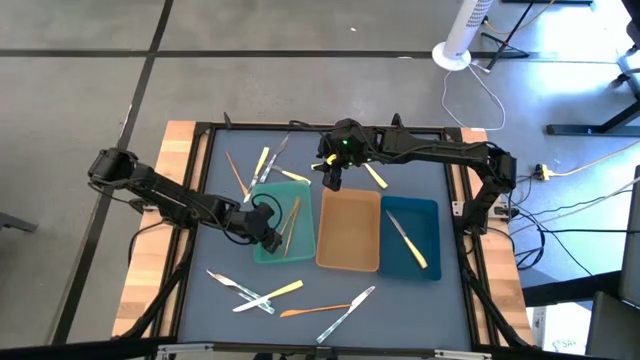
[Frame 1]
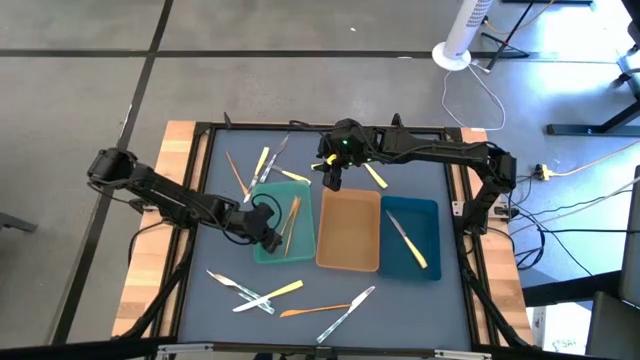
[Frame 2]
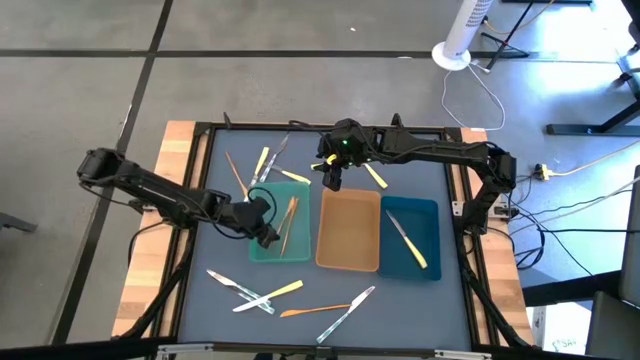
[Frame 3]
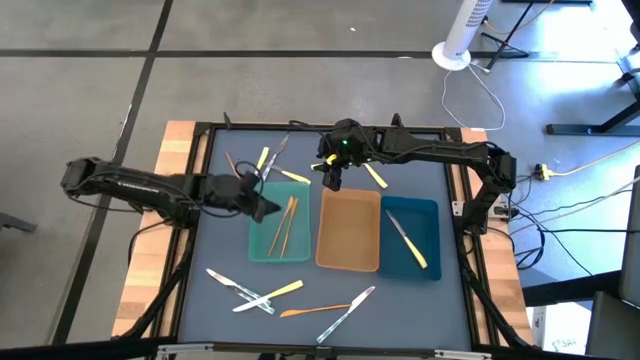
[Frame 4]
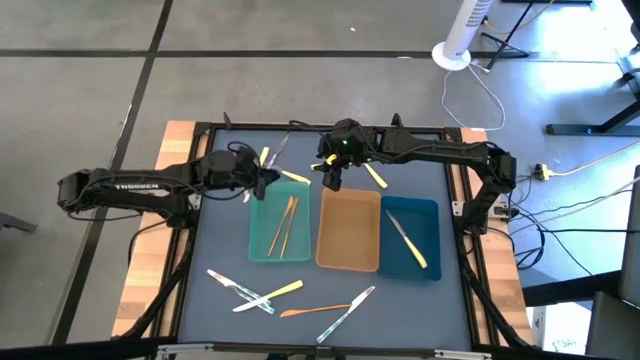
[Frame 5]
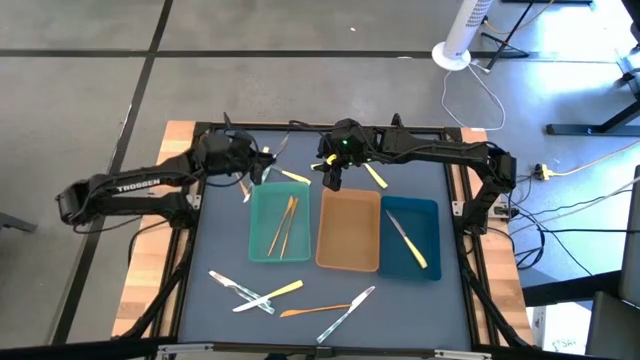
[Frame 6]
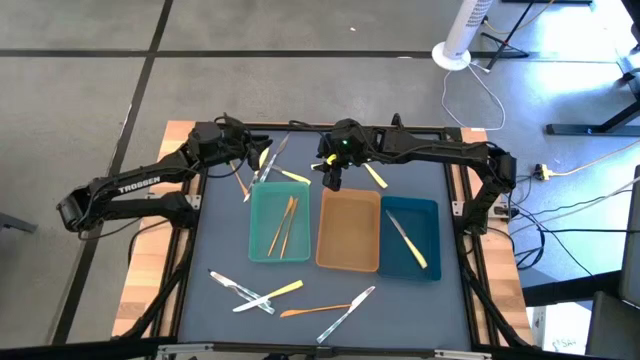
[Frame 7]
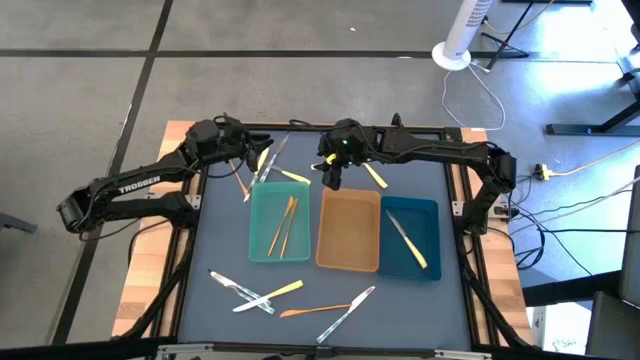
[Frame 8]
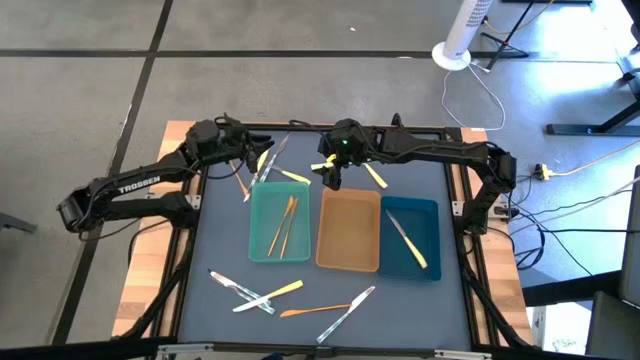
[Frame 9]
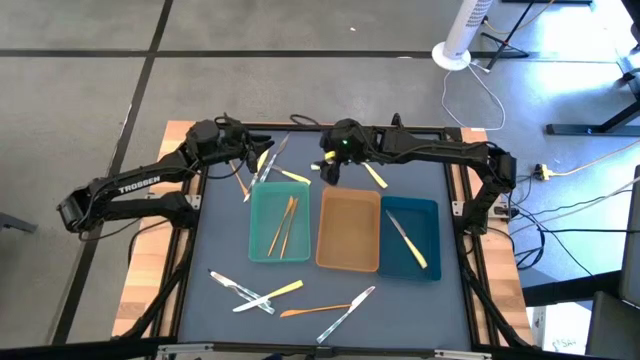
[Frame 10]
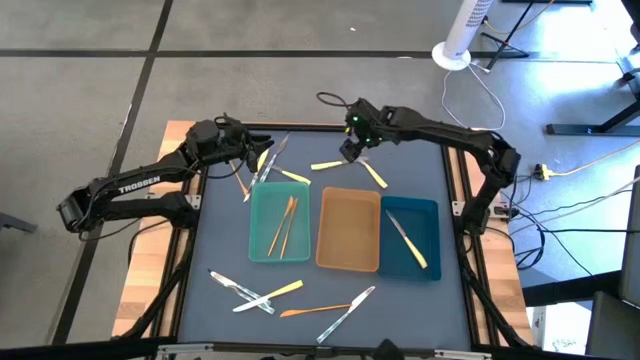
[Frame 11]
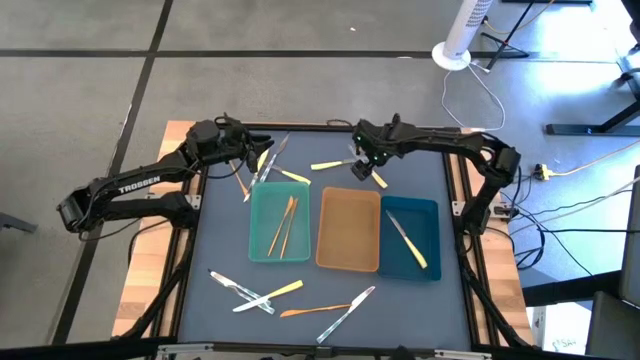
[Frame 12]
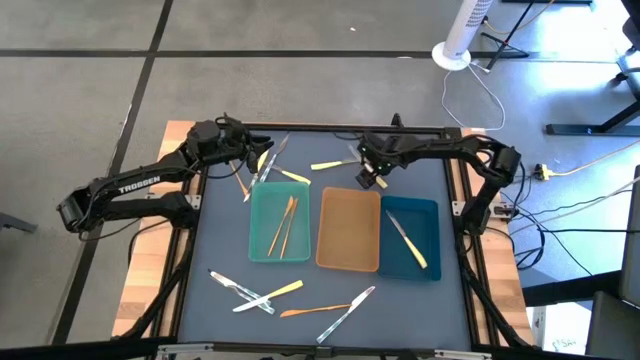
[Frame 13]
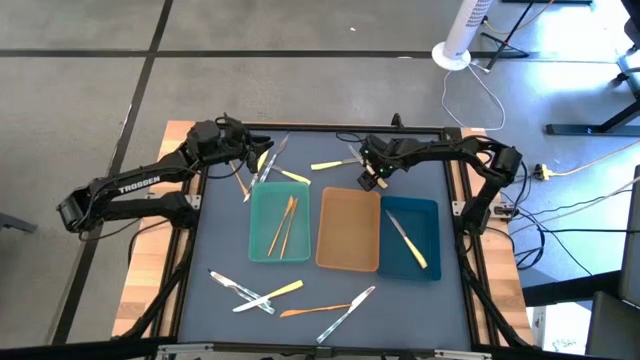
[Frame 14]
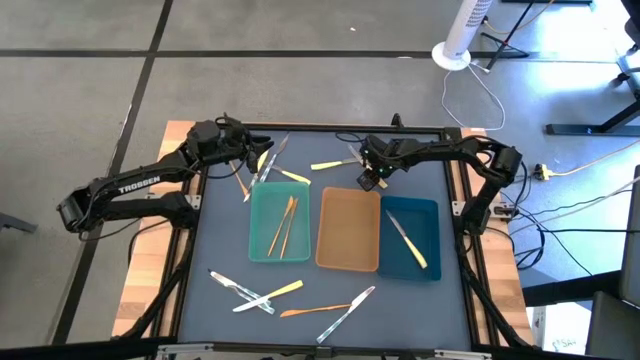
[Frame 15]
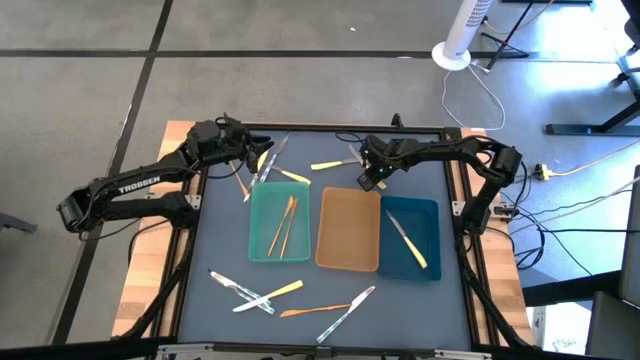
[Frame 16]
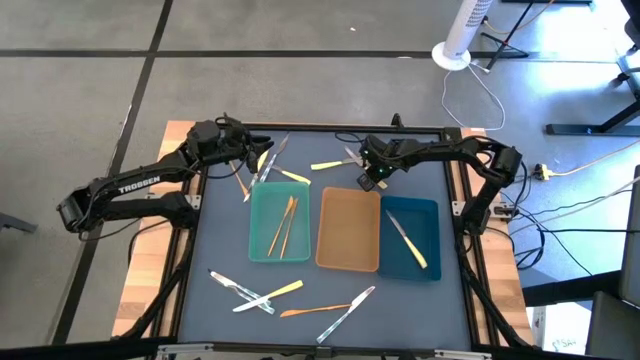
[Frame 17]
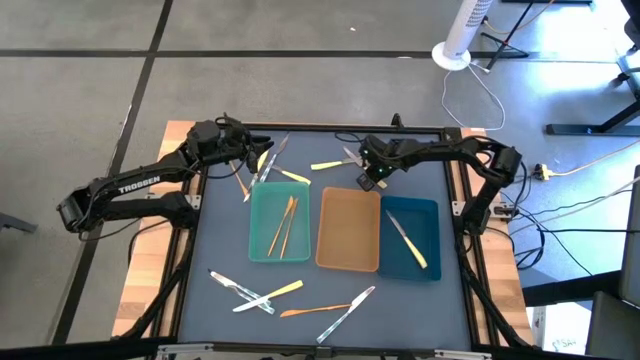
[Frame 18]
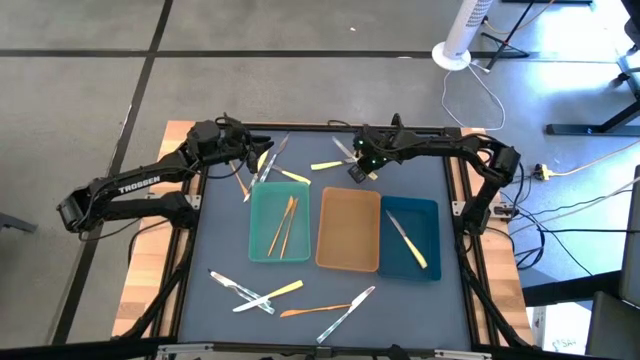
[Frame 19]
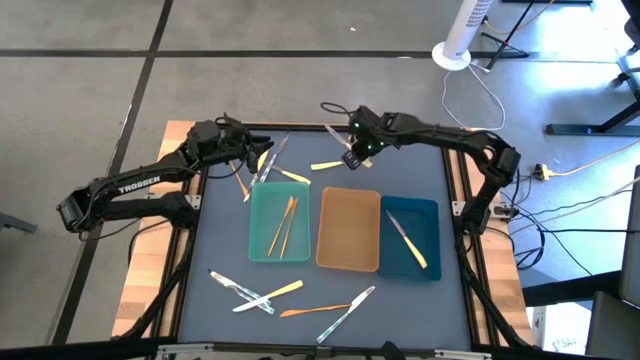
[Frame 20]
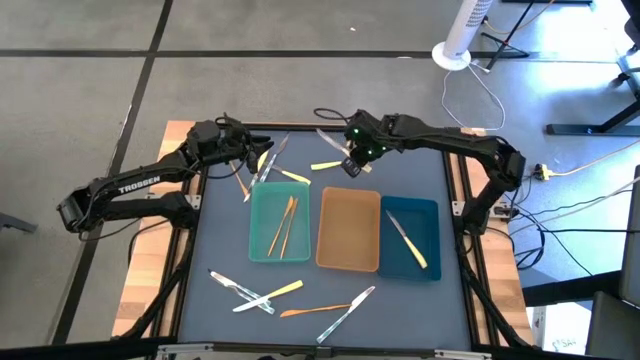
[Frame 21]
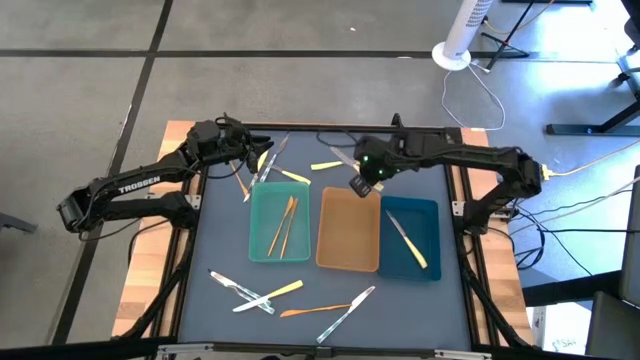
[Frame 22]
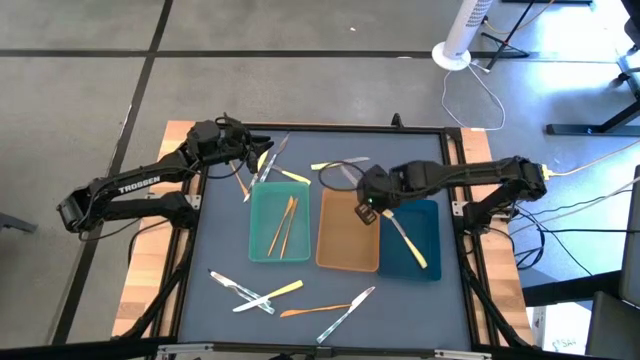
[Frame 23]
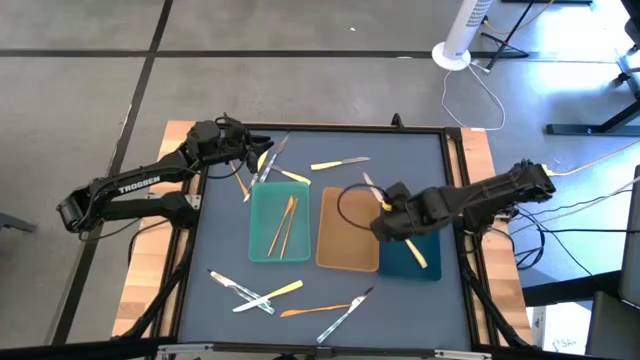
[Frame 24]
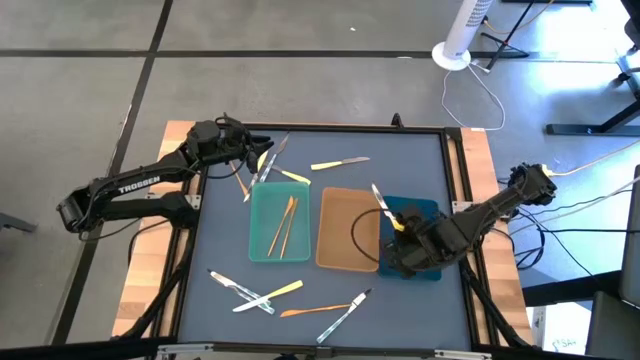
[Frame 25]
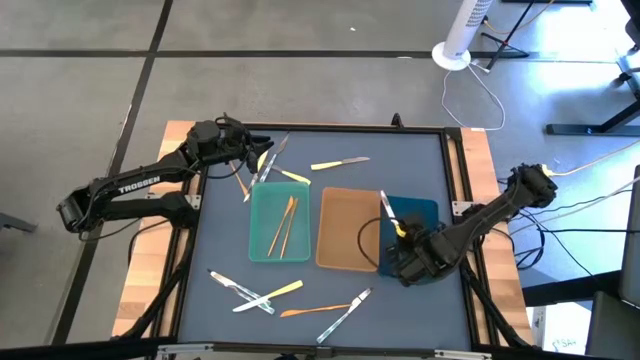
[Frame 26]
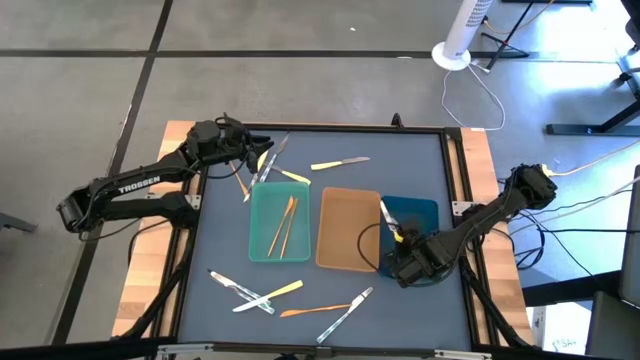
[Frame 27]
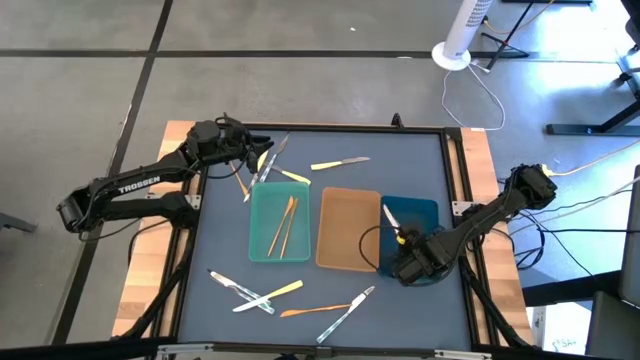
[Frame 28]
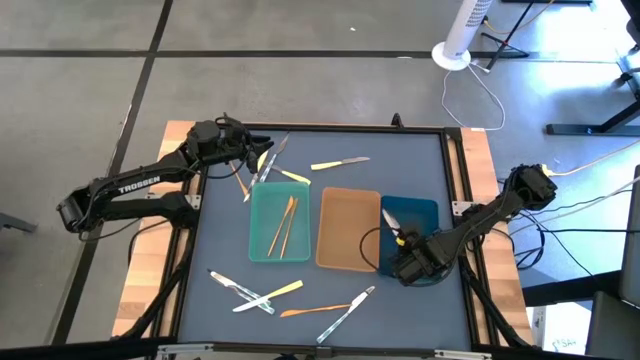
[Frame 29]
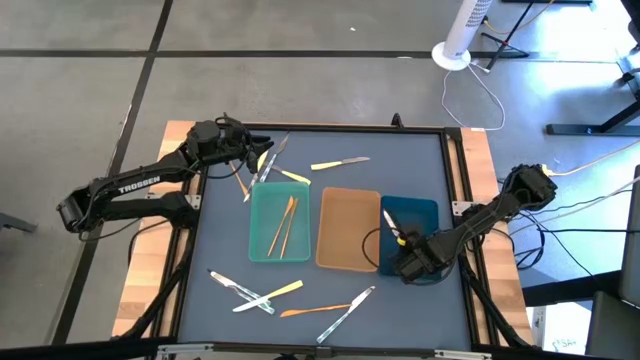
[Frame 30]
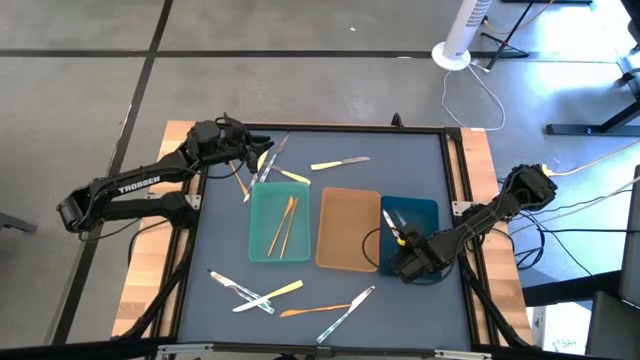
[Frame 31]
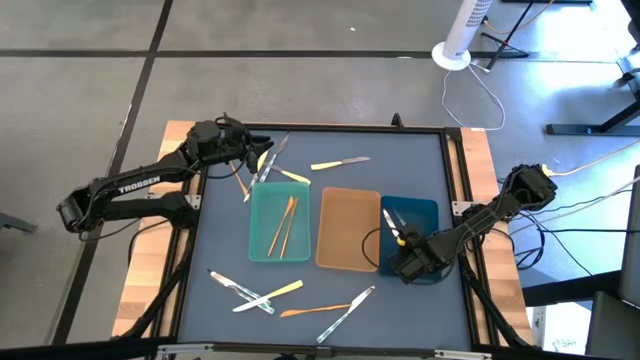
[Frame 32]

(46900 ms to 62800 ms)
Task: Sort silverware by color (type)
Put the yellow knife into the blue bin

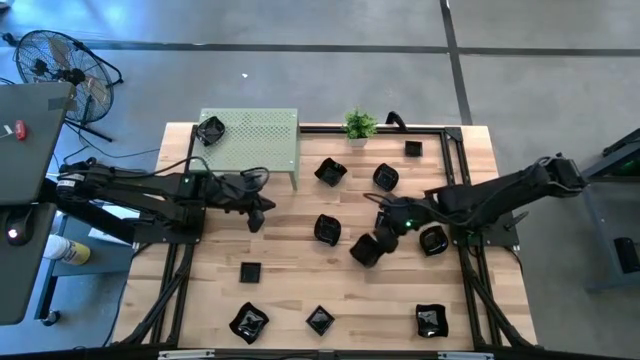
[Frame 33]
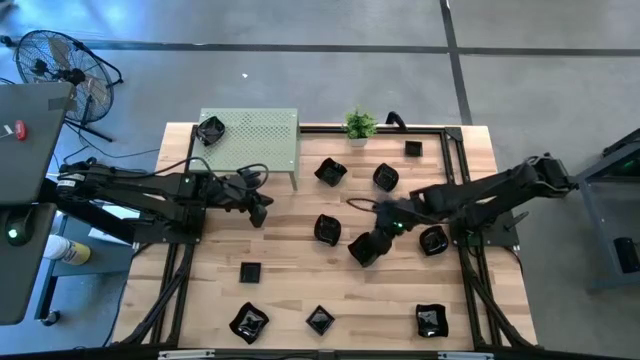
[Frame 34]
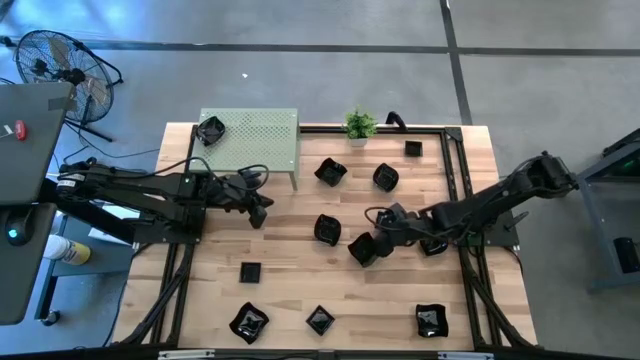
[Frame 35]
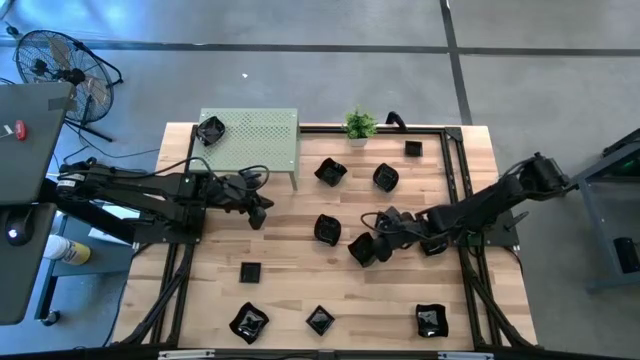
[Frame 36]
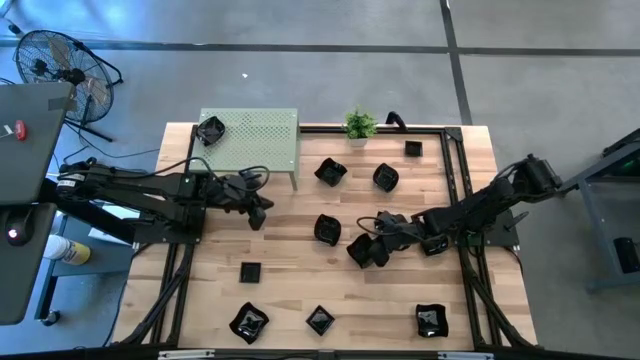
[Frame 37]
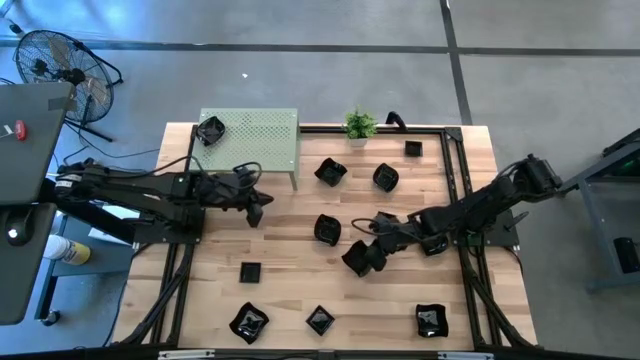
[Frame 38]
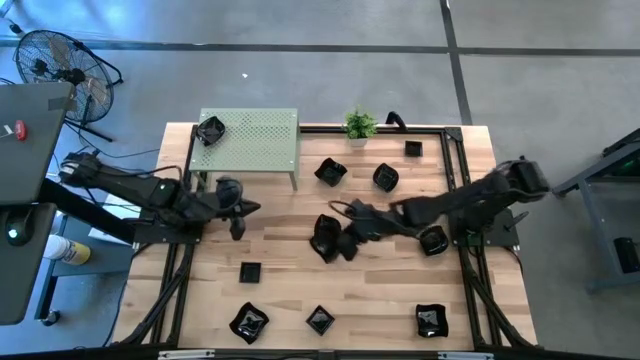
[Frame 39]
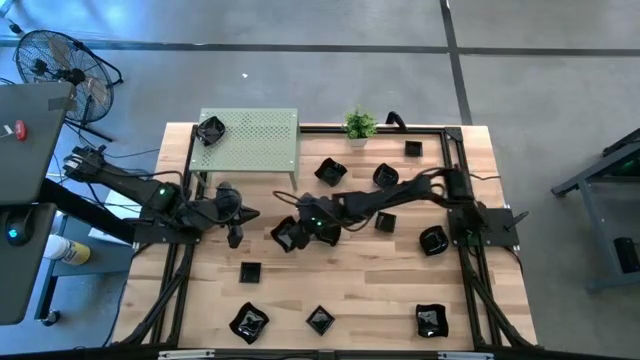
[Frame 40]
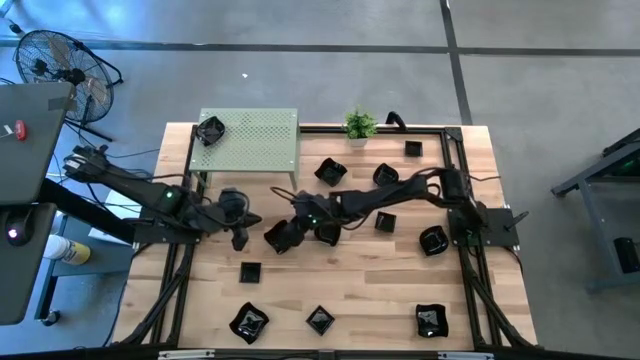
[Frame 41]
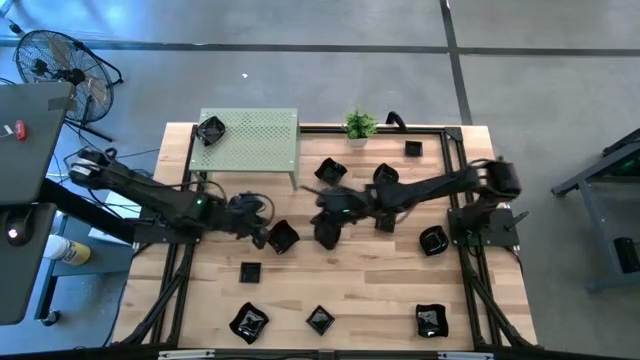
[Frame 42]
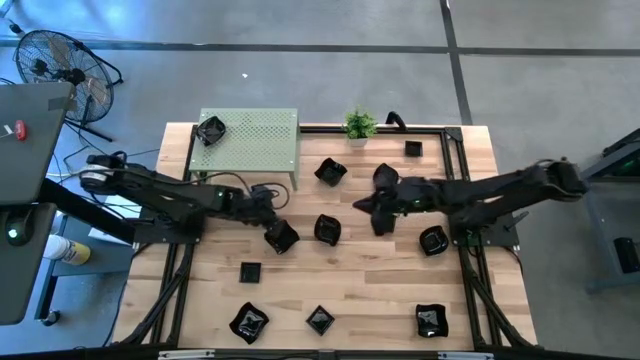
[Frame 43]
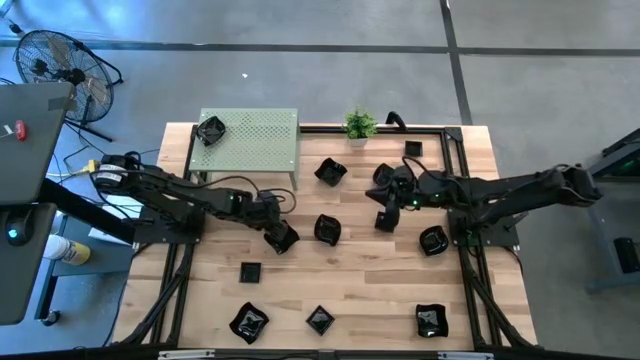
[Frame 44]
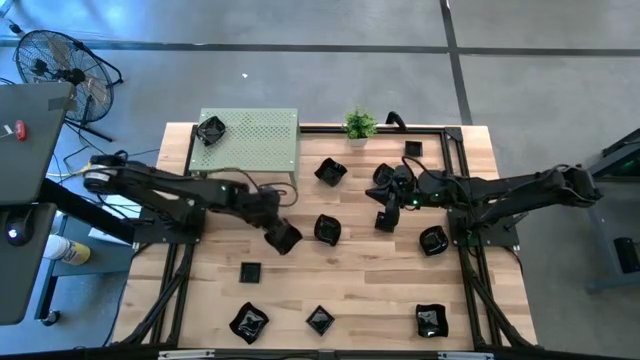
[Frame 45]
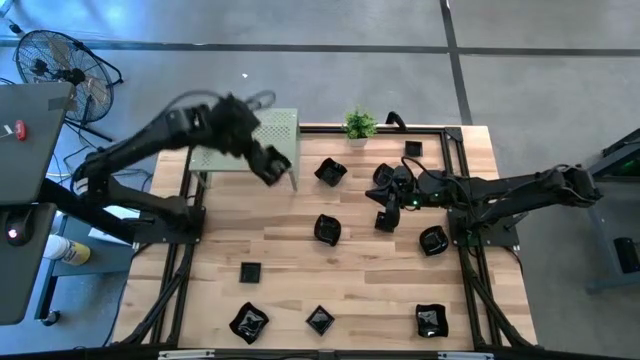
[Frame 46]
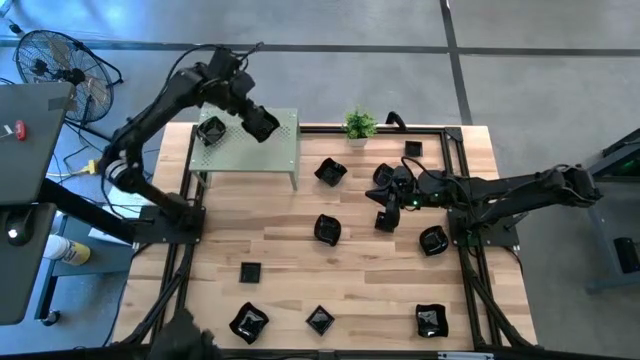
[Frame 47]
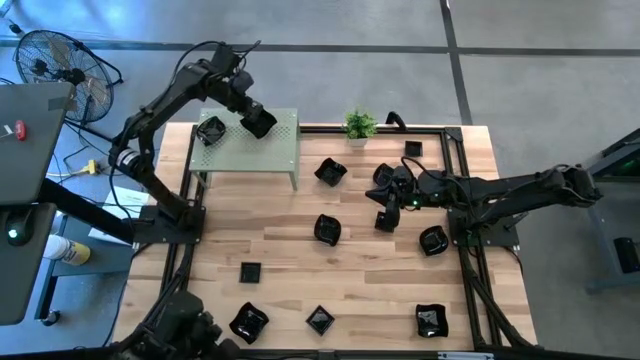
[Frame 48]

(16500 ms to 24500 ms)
Task: Pick & Place Mini shaped plates
Put the black distorted square plate on the right shelf
